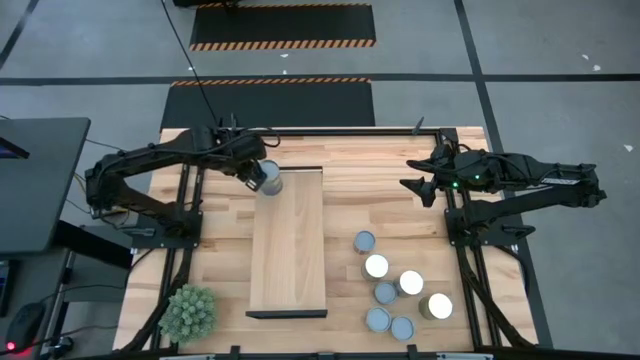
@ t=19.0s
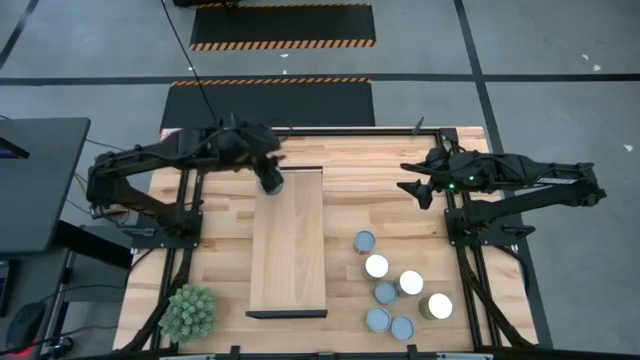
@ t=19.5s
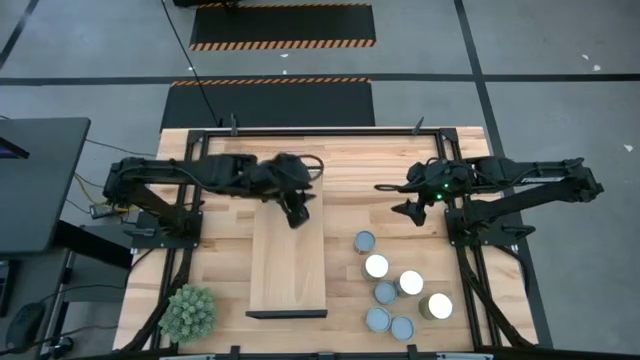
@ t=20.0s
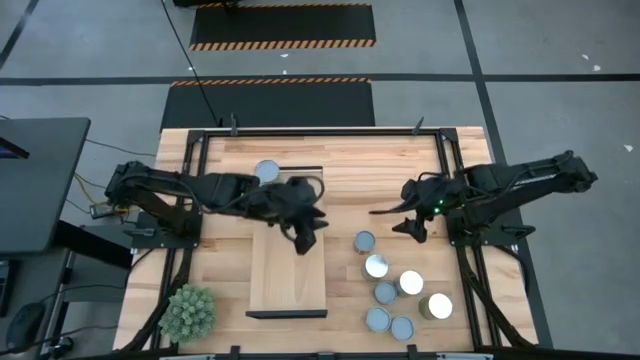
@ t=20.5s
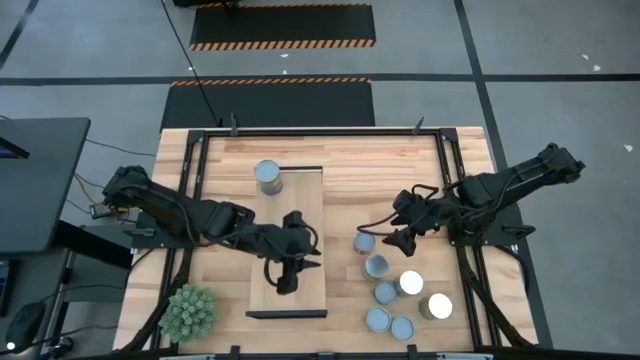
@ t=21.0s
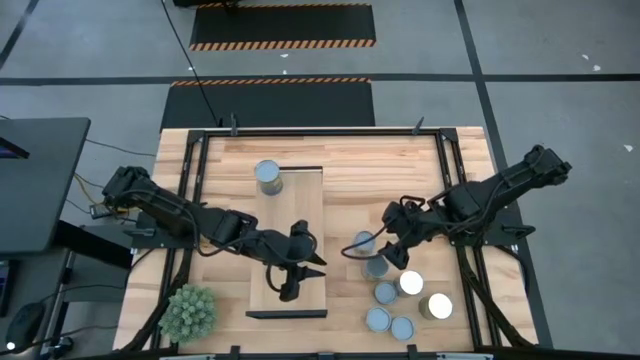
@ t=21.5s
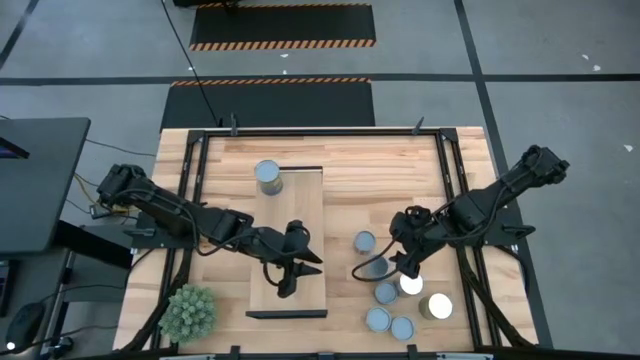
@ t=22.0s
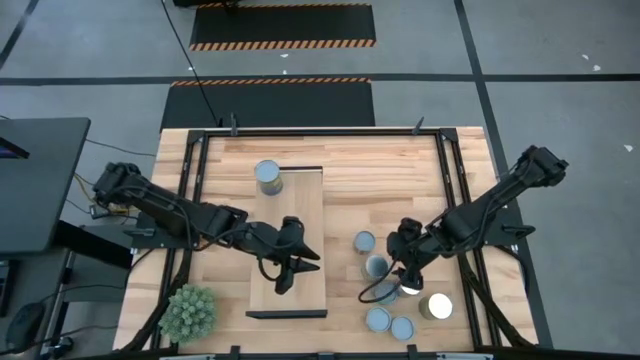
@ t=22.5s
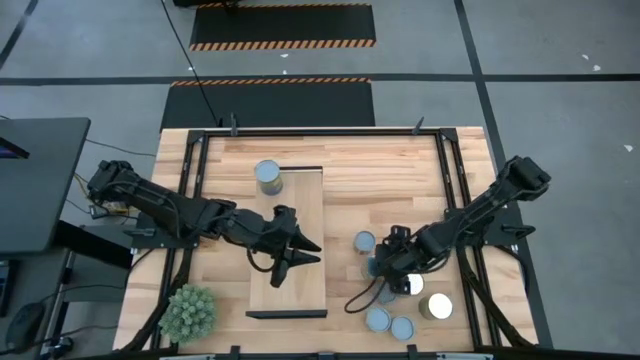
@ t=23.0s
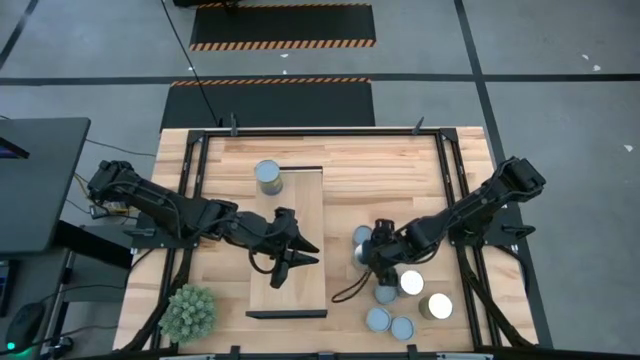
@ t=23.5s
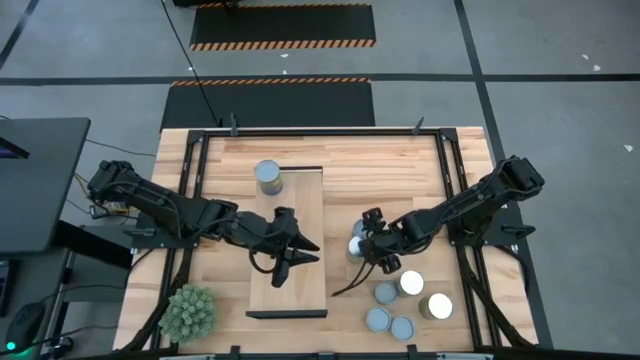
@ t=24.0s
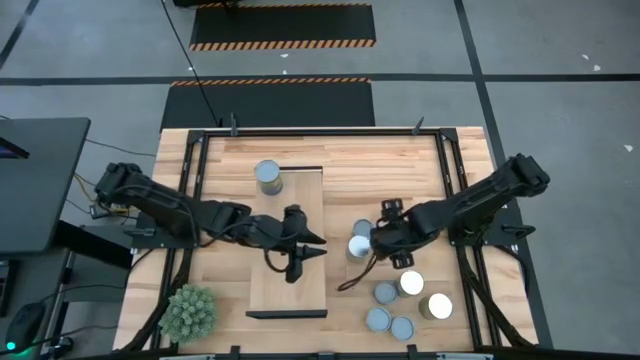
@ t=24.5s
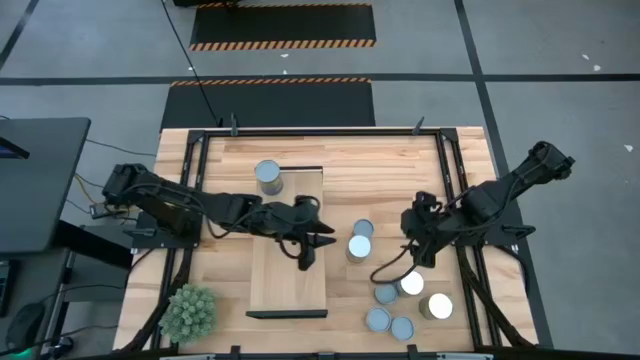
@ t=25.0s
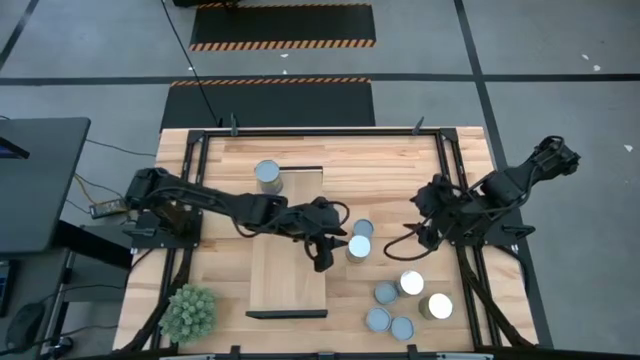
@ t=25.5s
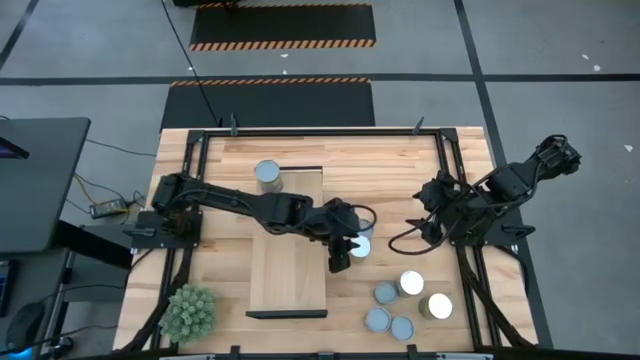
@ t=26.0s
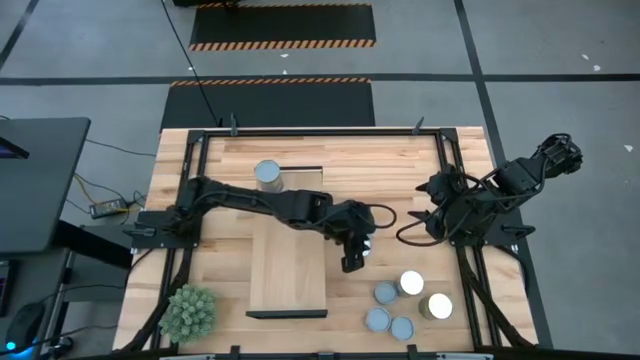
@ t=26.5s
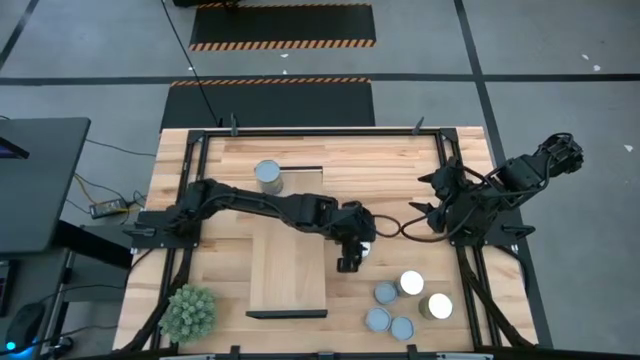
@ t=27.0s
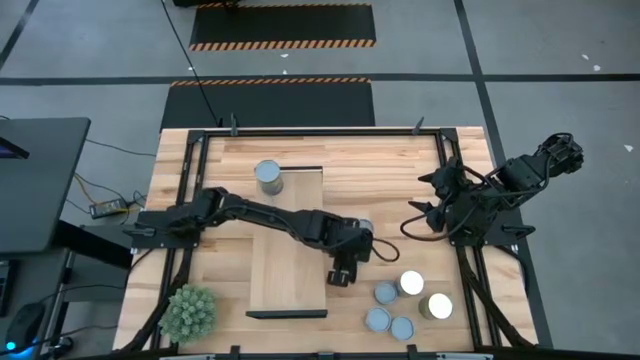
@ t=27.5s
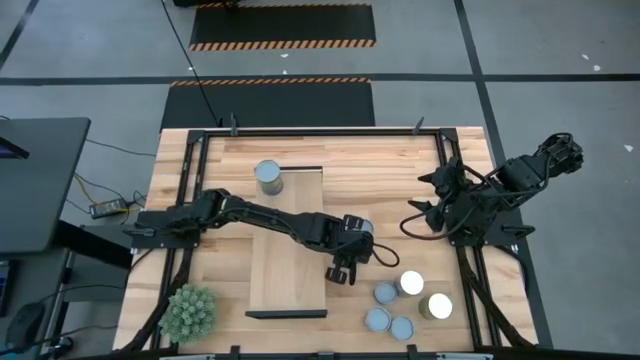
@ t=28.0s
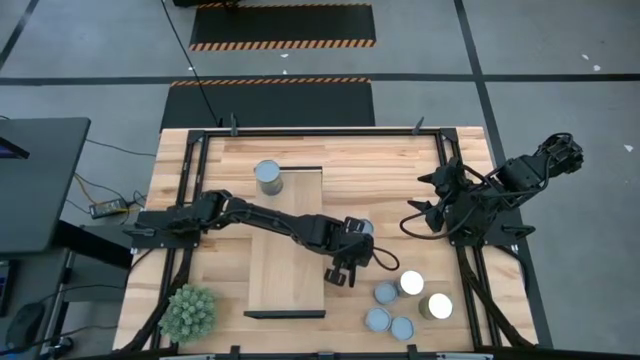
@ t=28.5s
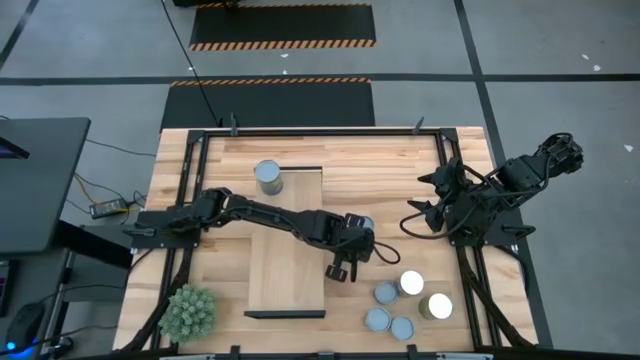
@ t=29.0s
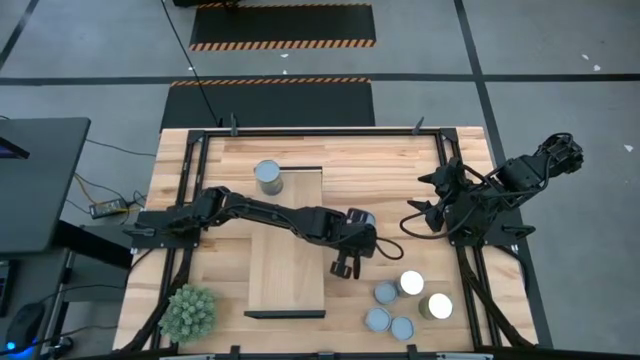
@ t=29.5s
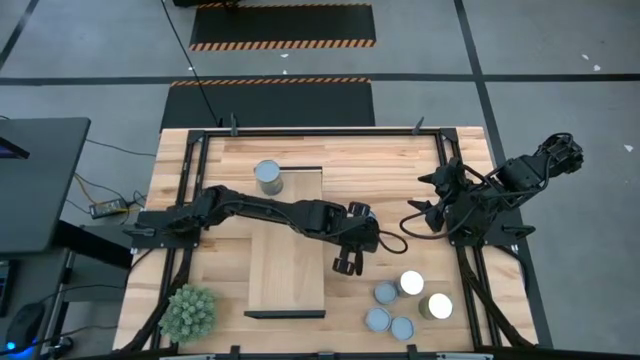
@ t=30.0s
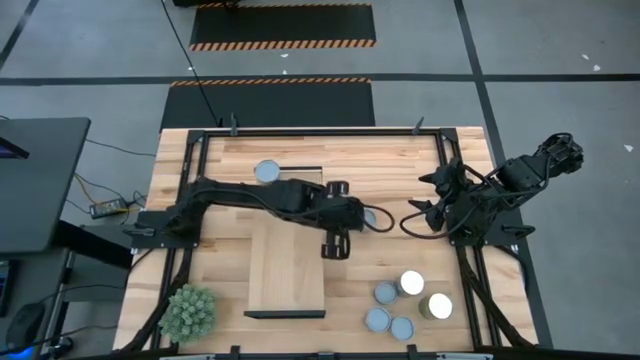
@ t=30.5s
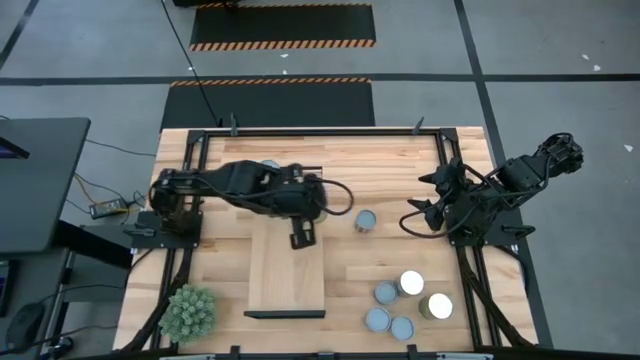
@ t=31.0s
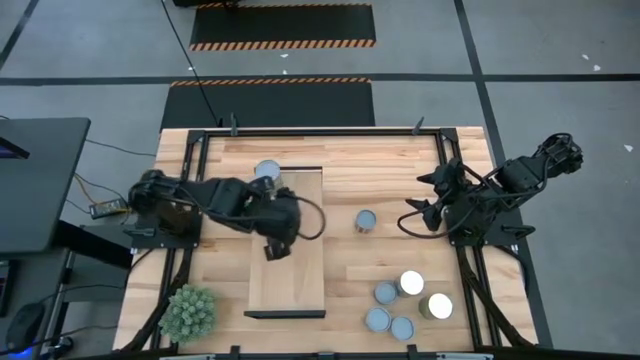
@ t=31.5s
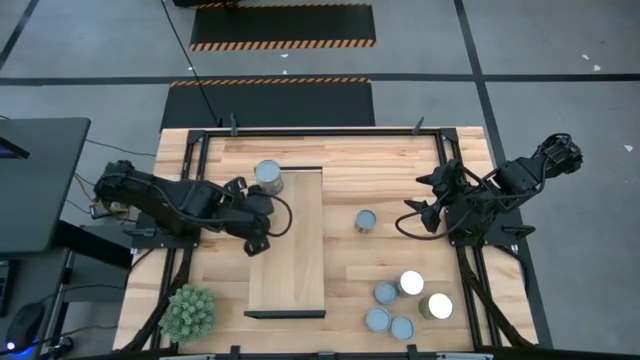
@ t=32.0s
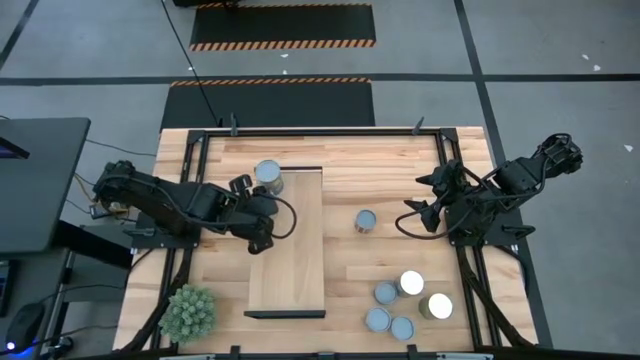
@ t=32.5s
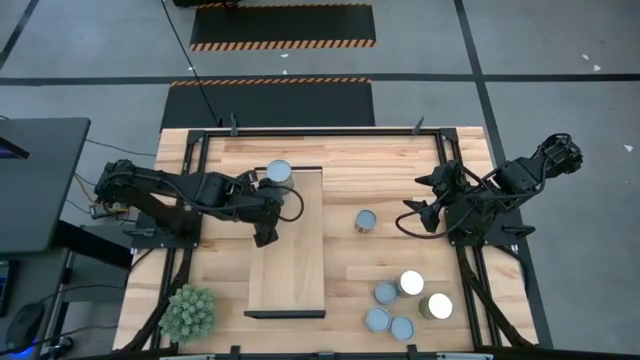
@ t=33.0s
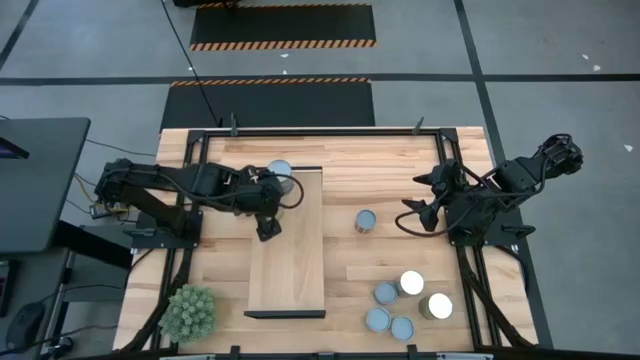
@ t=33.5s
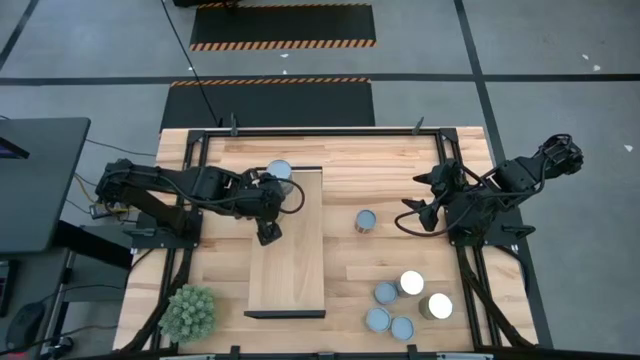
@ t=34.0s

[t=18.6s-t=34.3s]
Task: Pick and place cans onto a shelf
Put the canned carrots on the shelf

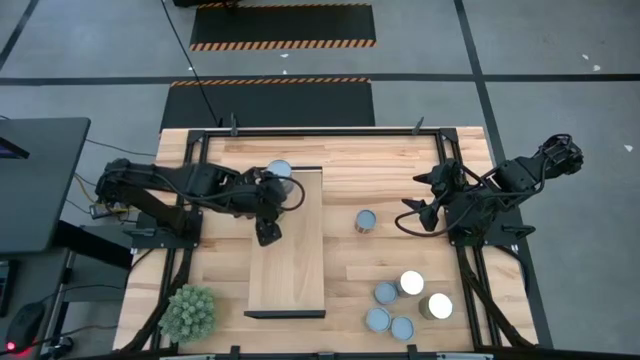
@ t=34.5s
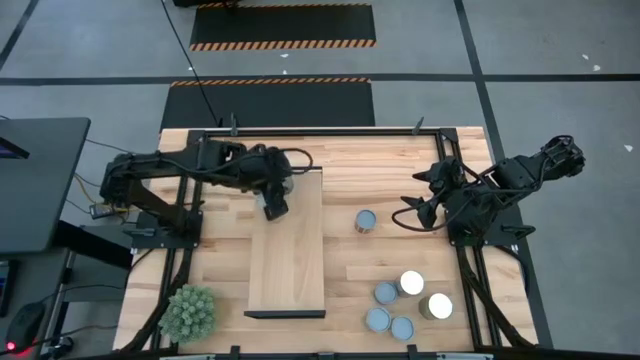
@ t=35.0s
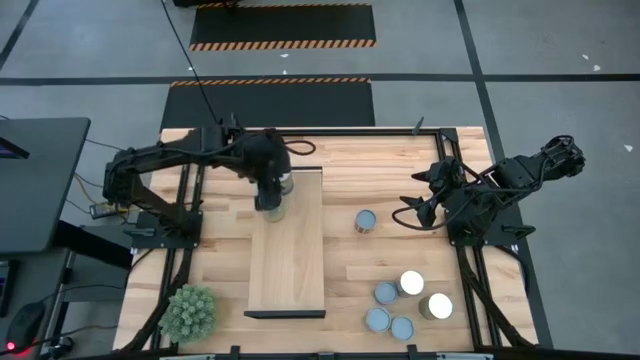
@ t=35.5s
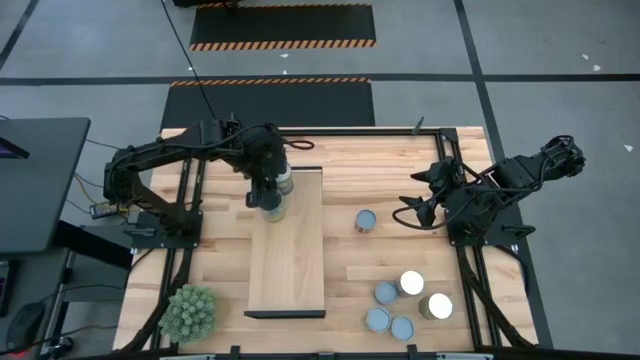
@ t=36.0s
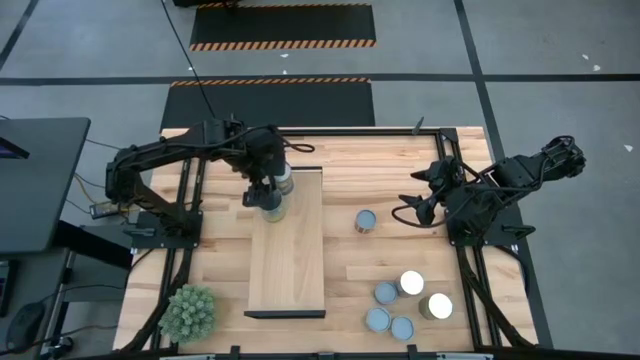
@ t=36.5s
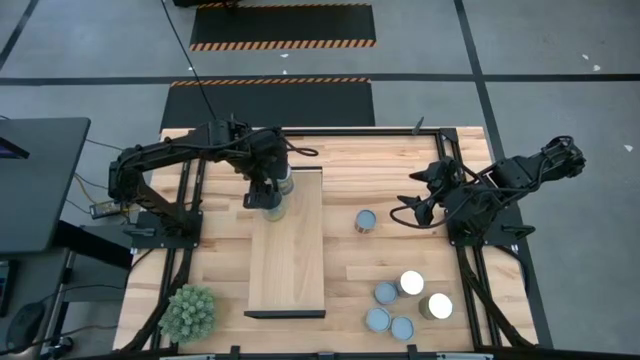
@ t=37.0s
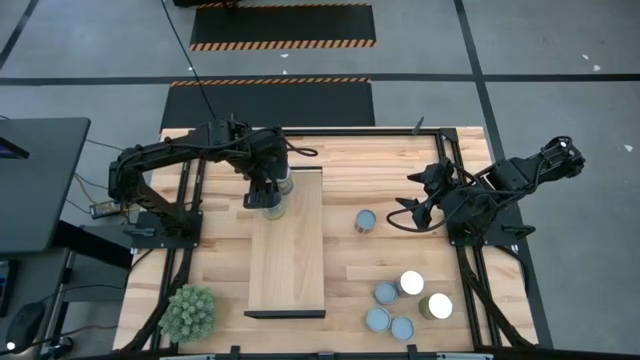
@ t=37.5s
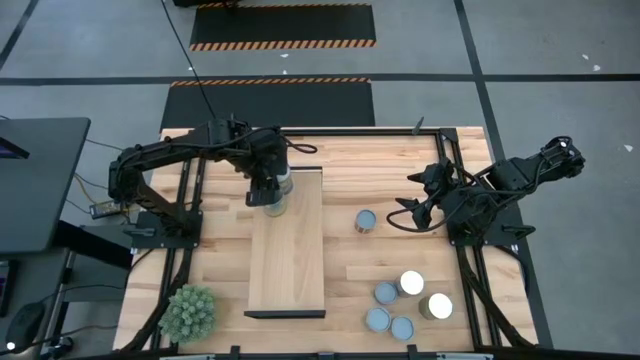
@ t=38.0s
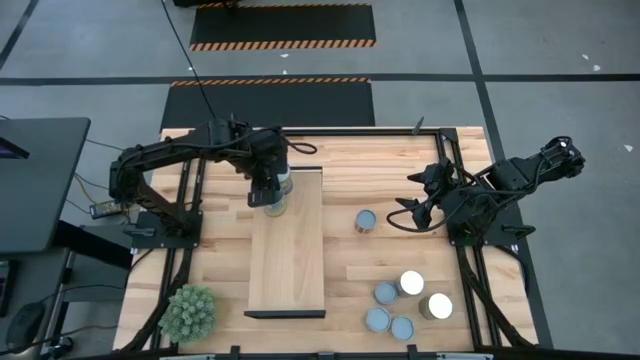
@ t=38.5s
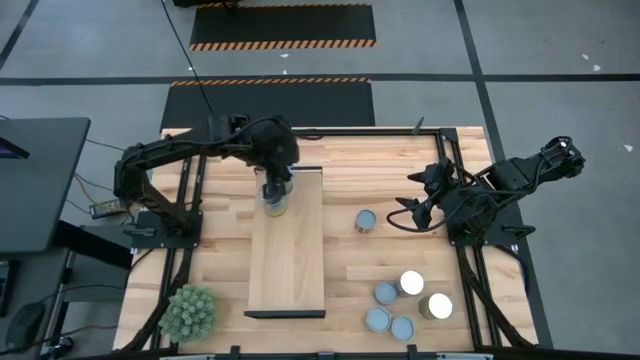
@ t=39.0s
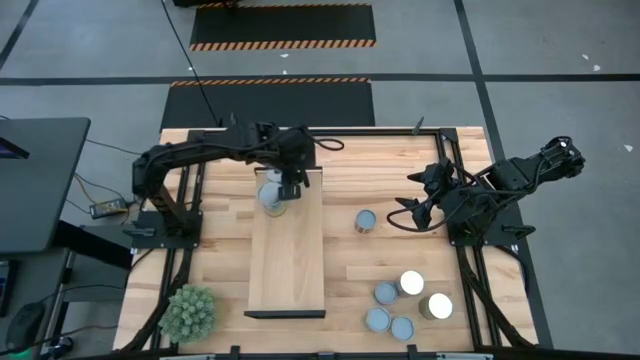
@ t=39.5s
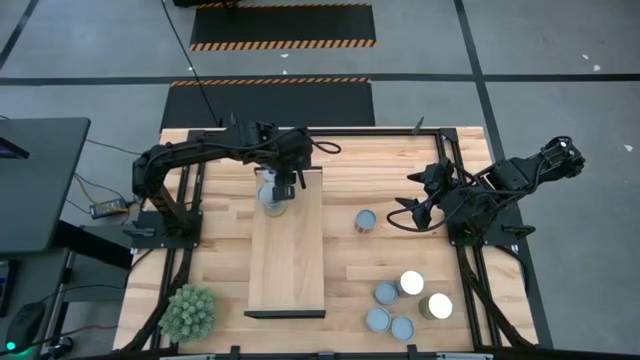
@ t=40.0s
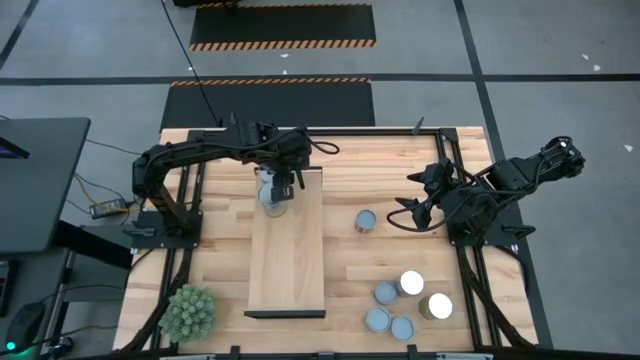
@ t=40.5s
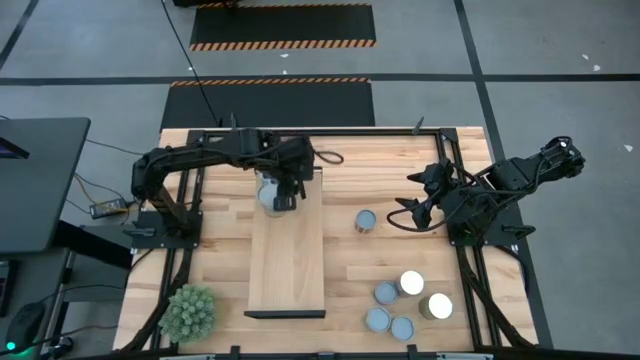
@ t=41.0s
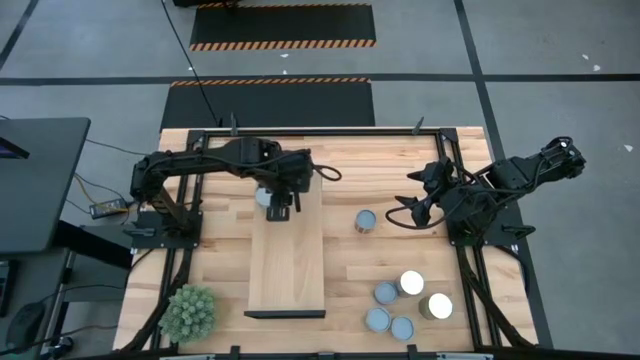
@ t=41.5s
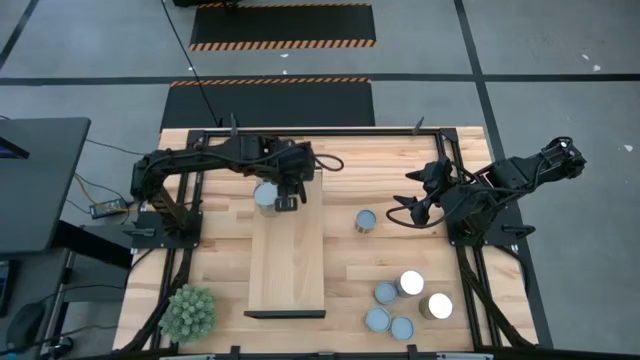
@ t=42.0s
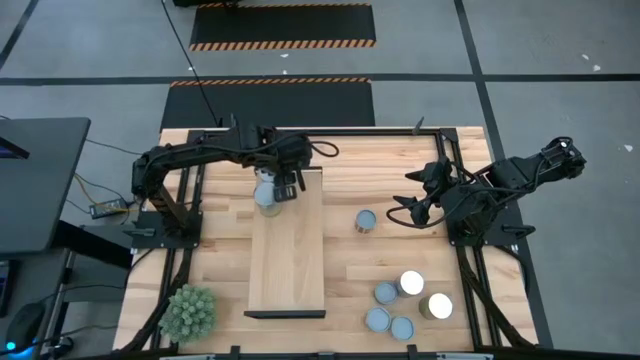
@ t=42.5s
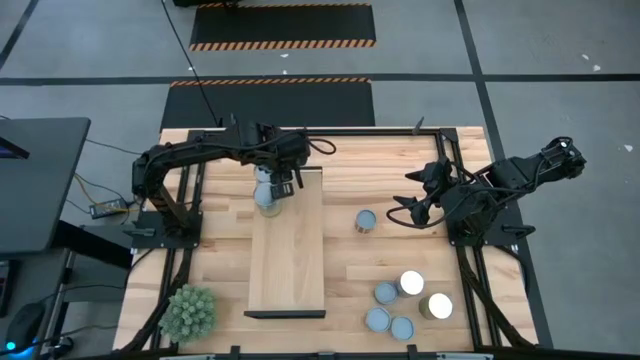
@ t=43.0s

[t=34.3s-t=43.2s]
Adjust the cans on the shelf
